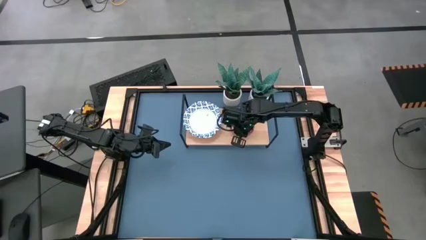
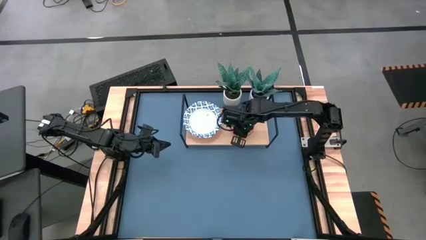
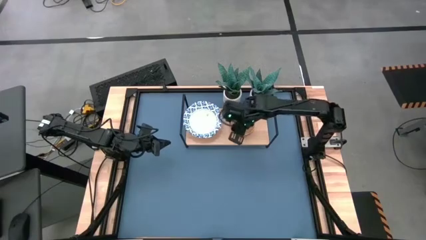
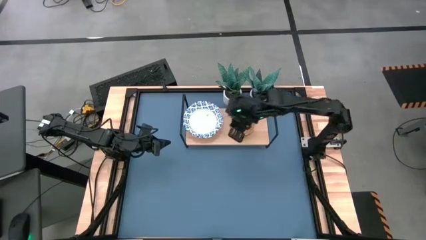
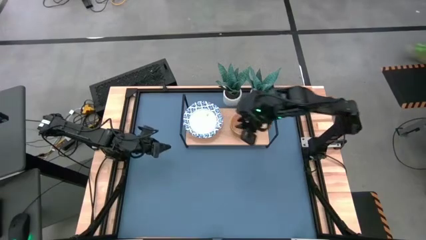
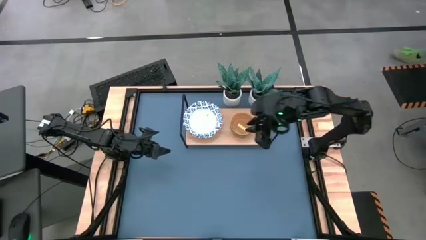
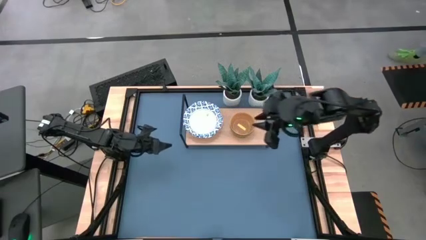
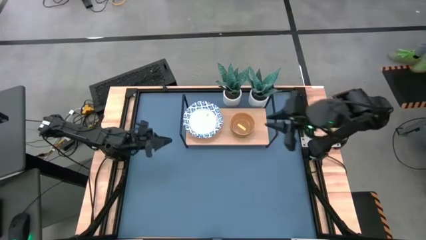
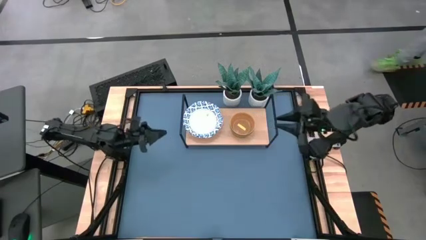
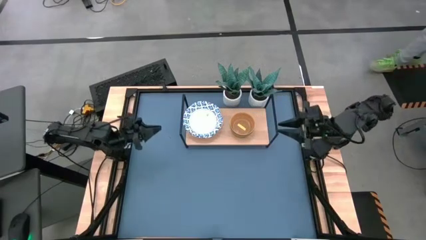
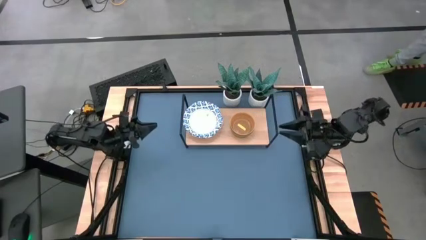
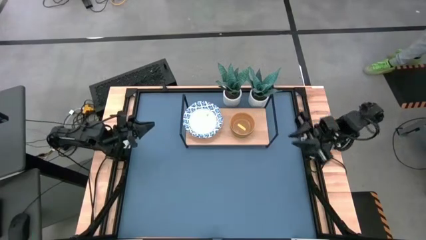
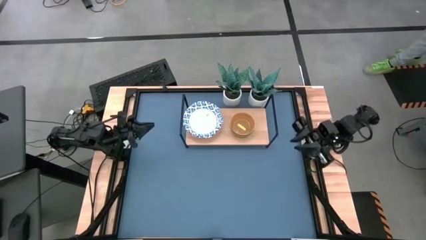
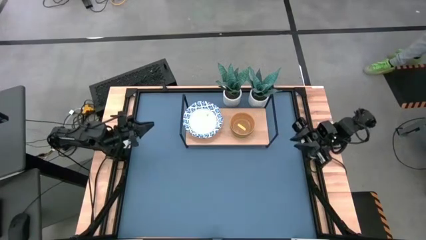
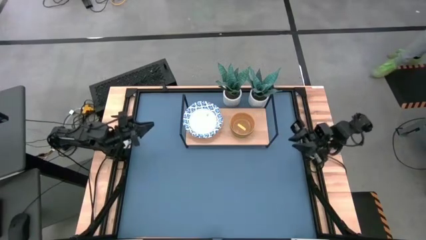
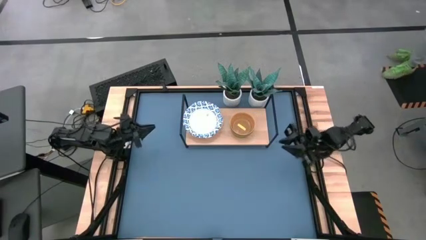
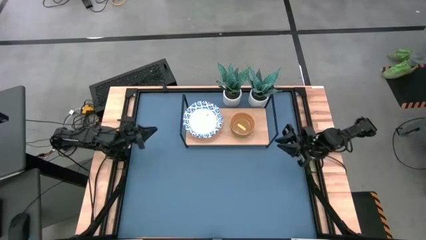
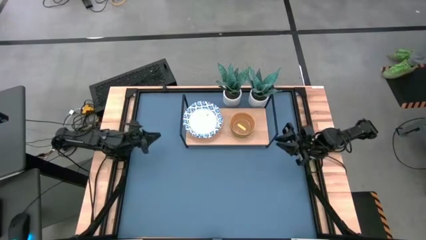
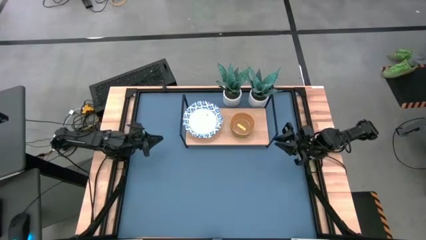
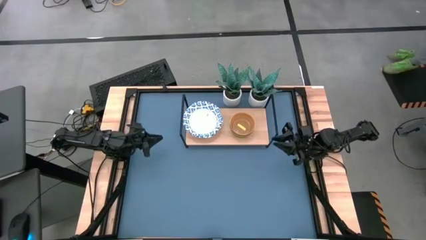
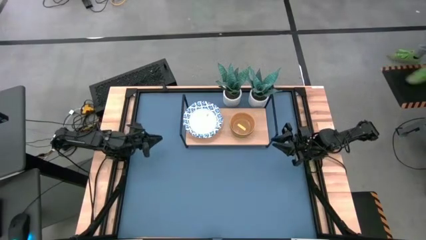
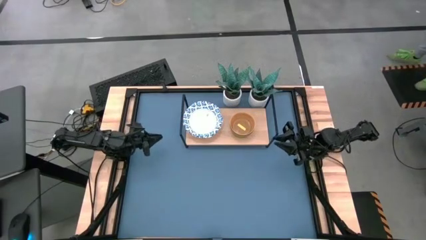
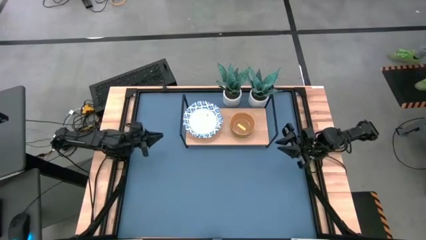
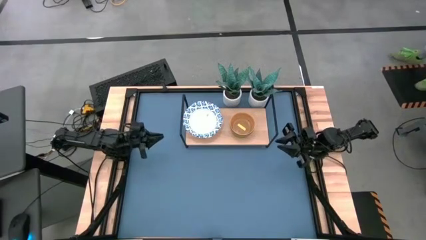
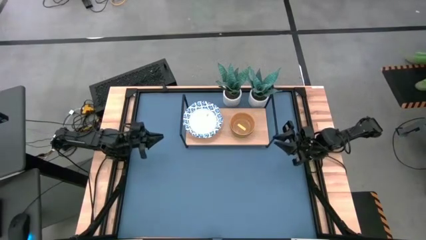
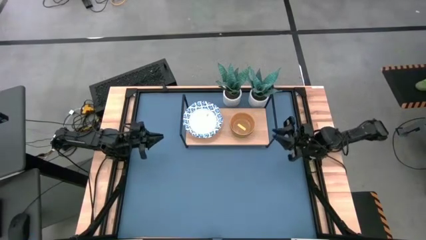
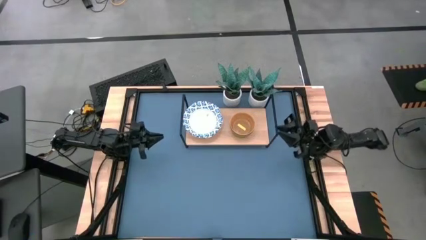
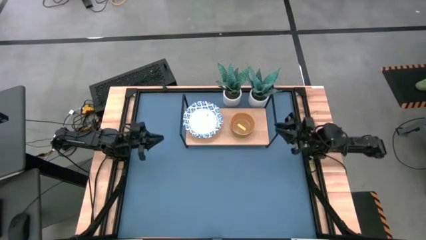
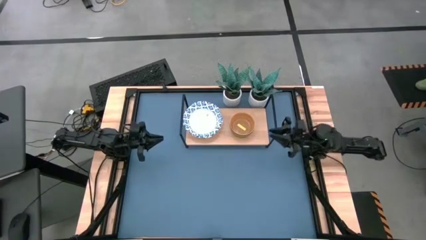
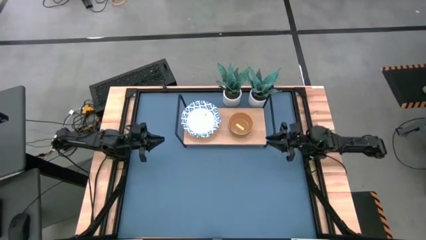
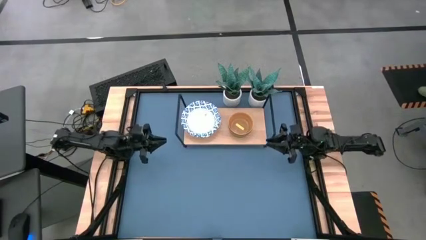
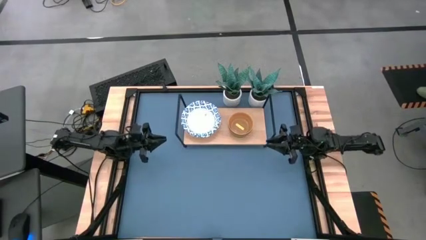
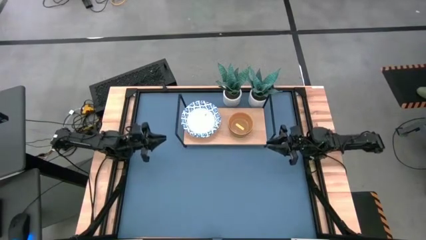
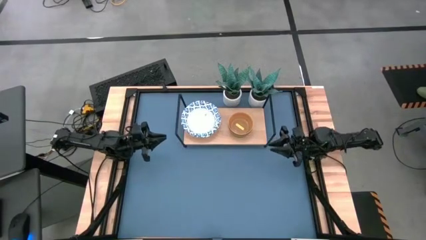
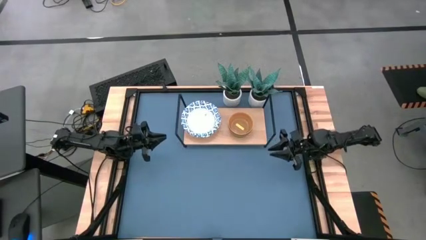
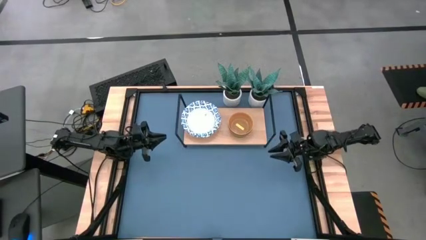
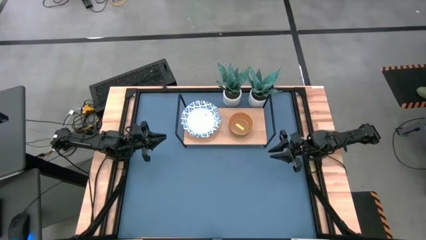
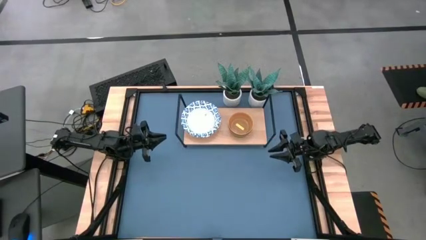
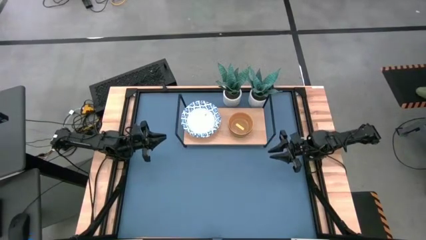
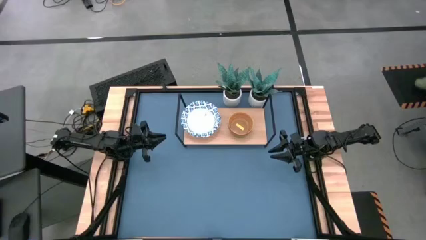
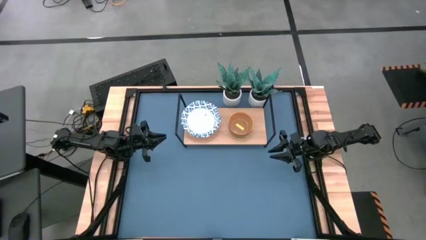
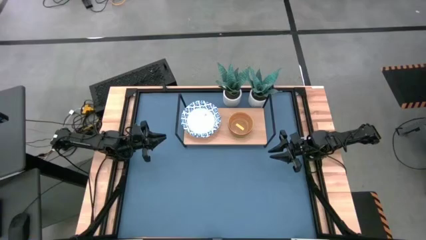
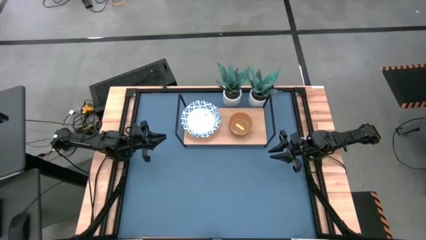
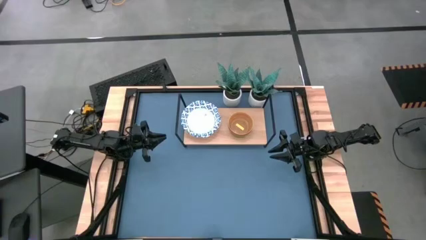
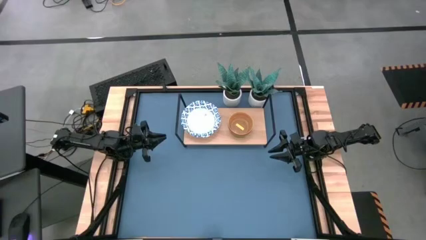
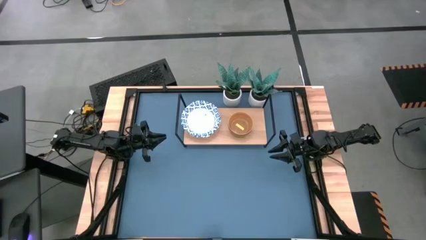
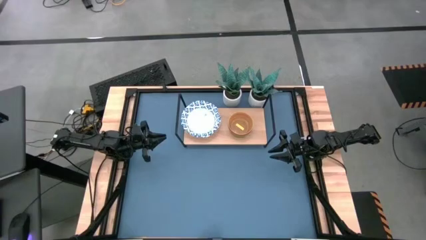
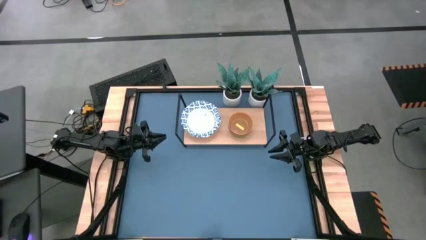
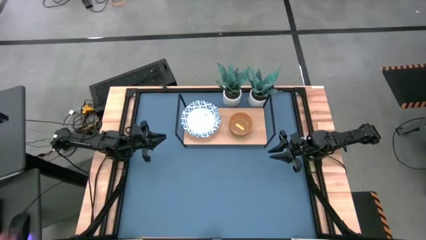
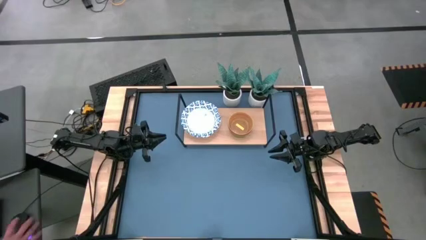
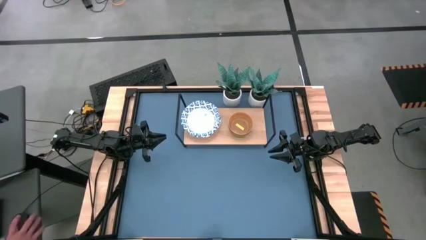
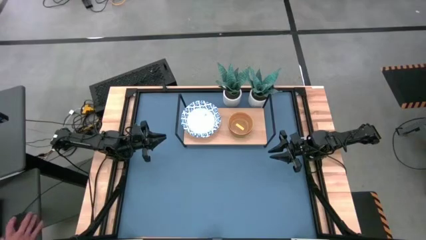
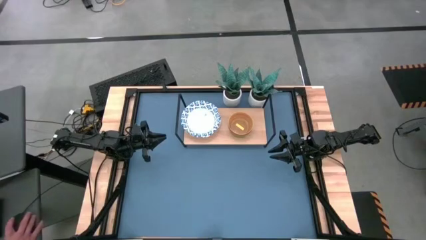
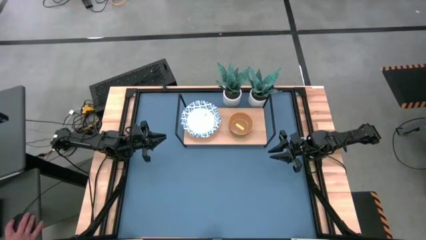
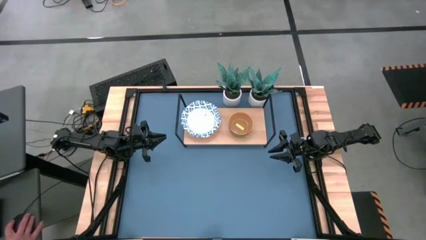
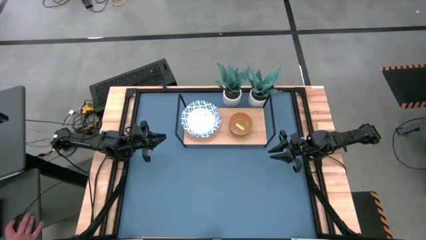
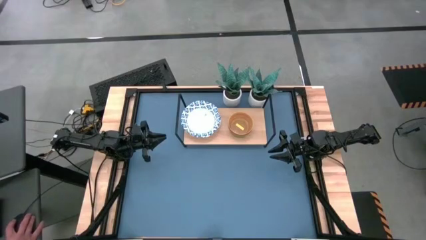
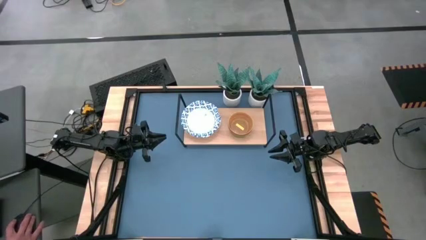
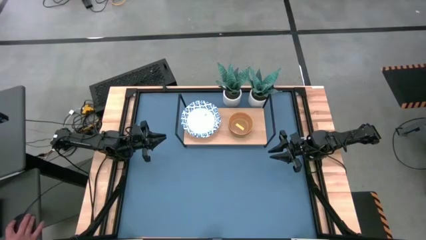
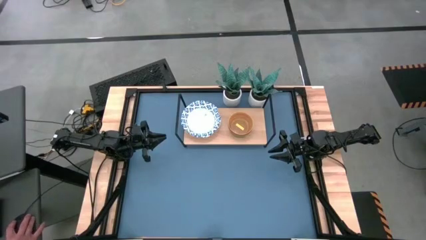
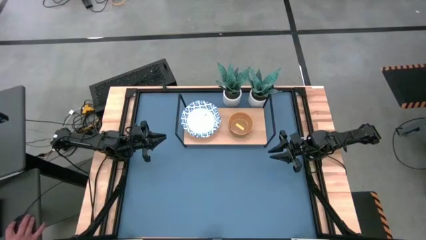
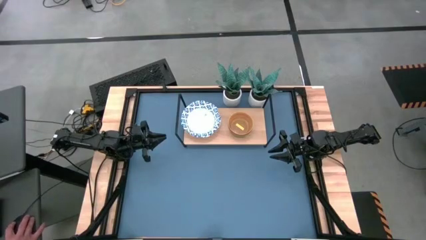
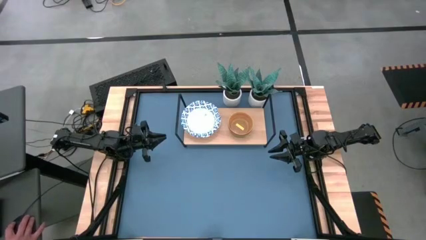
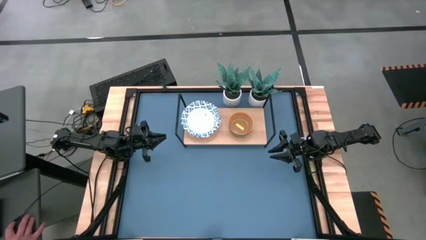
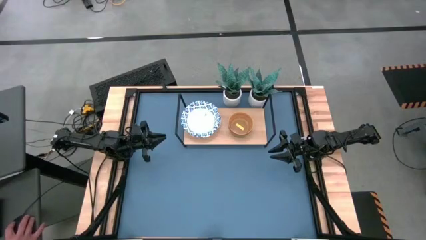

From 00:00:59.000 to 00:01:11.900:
Task: Place and stack bowls onto a shelf
Return to Home Position

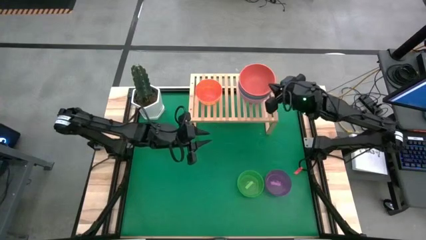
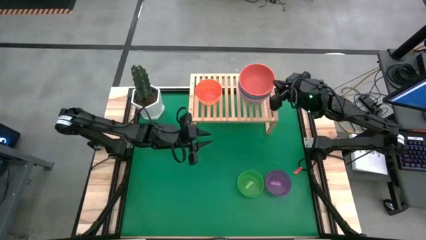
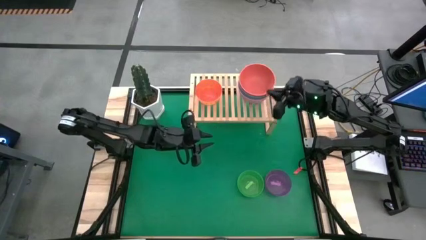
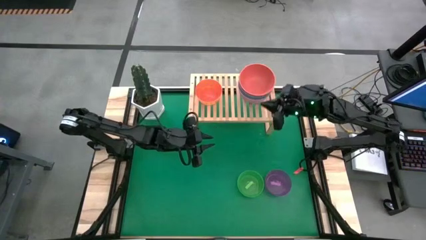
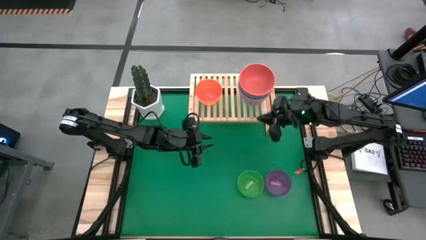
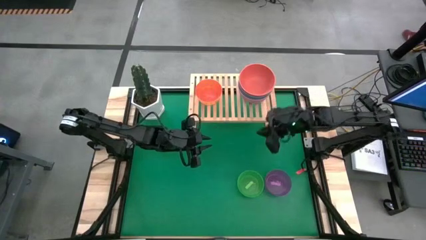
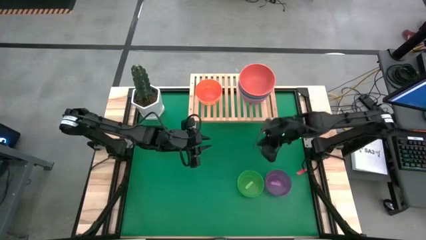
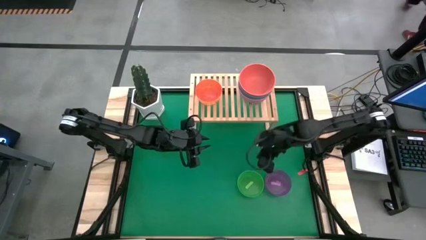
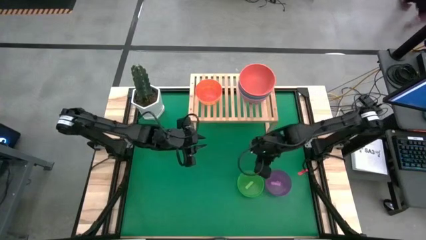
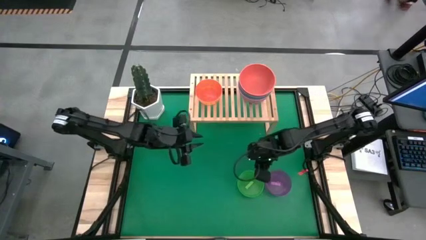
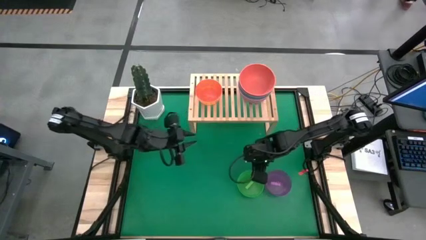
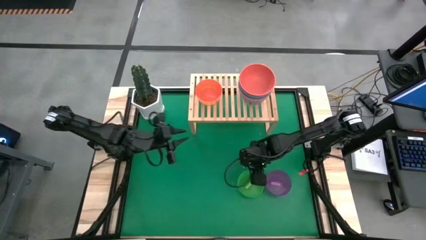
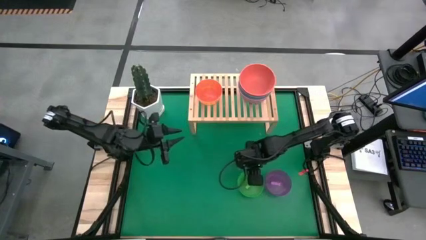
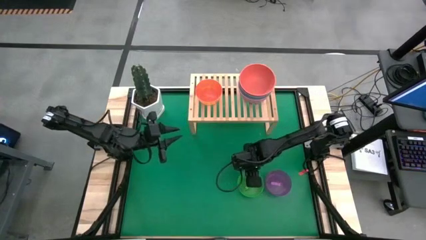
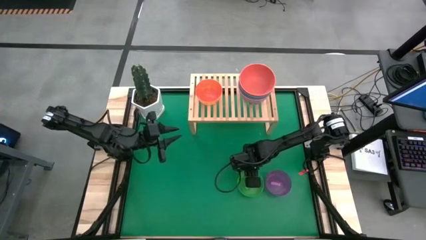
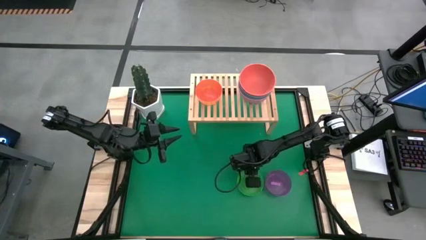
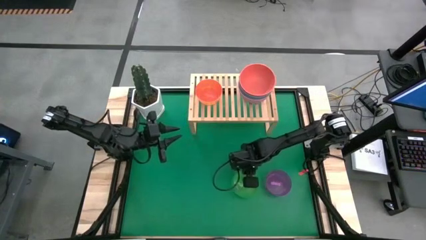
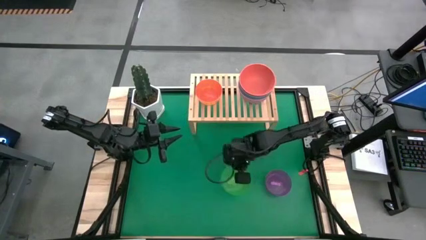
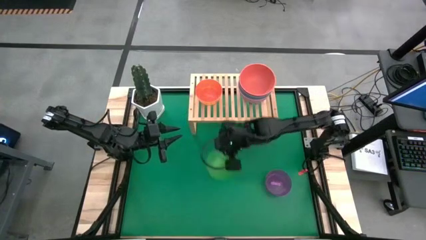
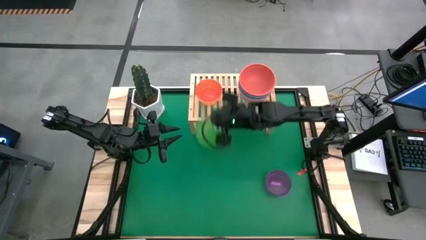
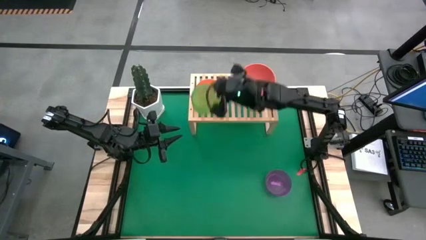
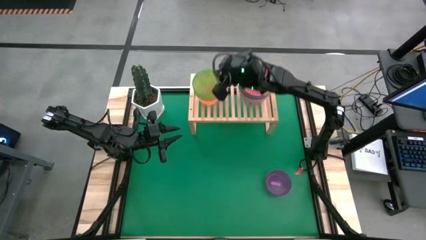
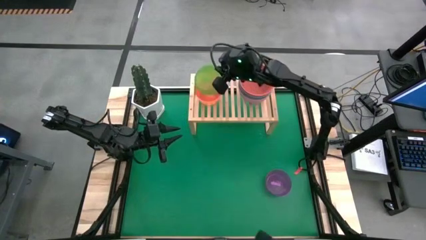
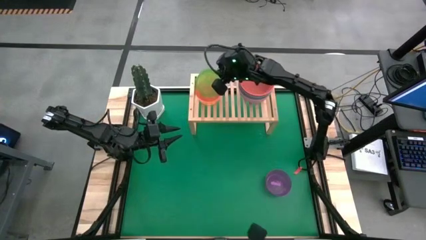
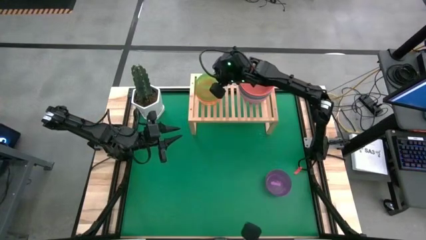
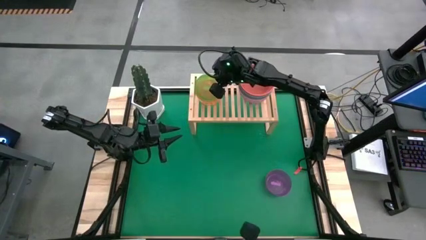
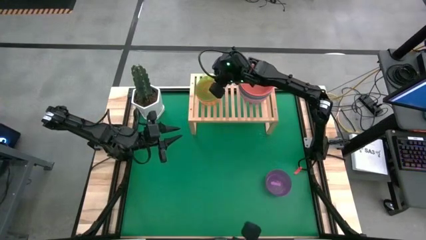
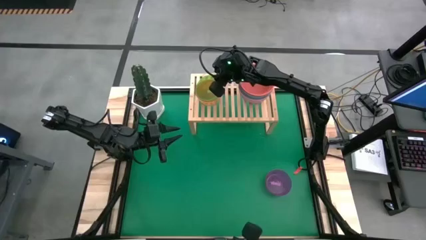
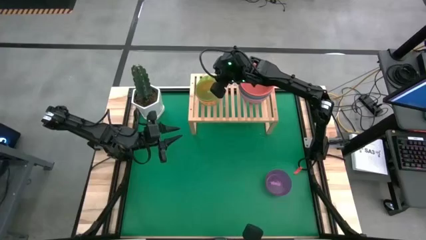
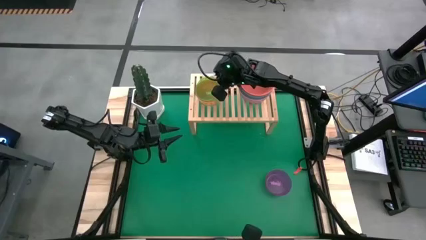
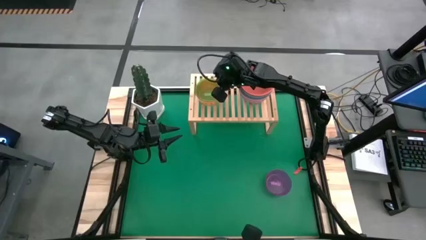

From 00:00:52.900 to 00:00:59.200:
Task: Place and stack bowls onto a shelf
Stack the green bowl on top of the light orange bowl on the shelf
